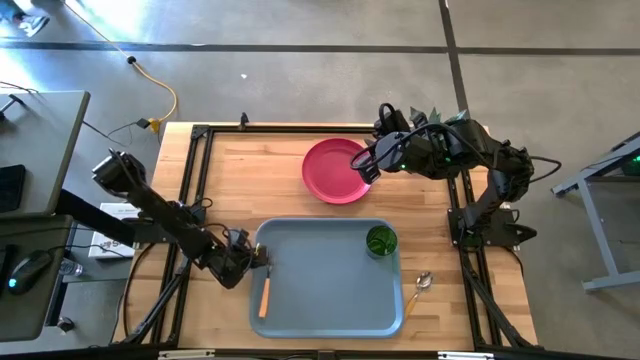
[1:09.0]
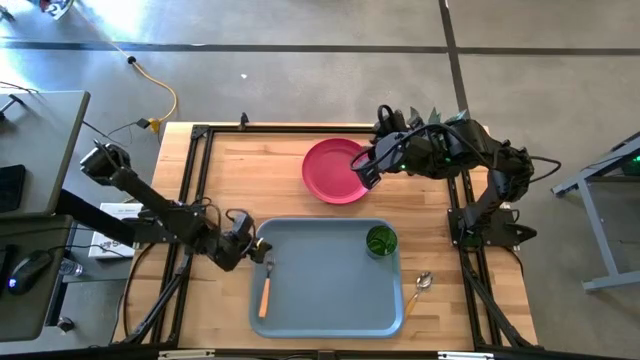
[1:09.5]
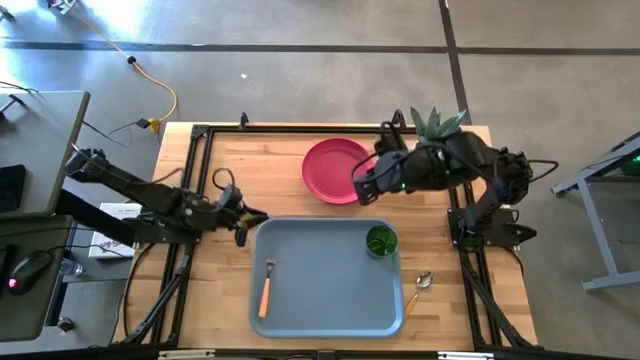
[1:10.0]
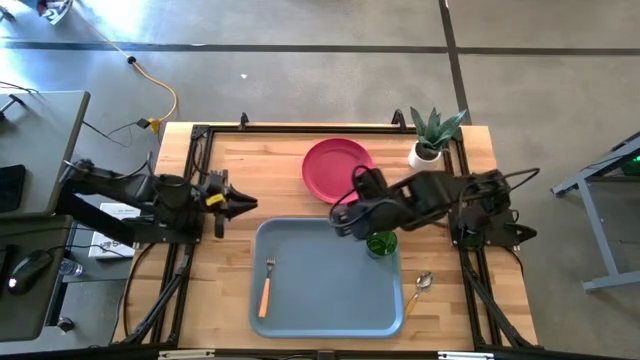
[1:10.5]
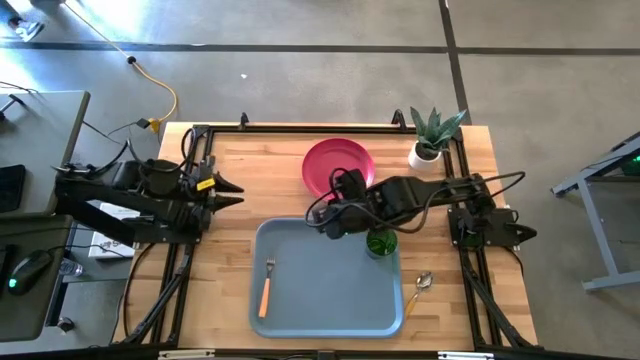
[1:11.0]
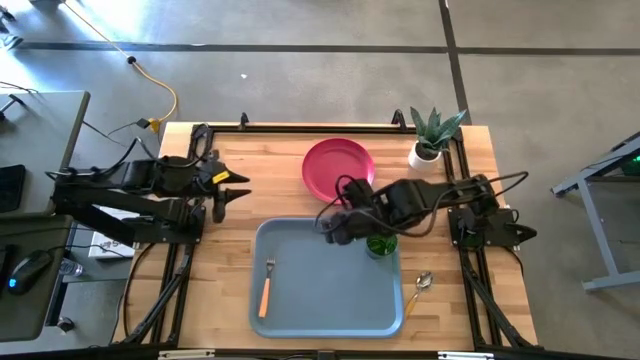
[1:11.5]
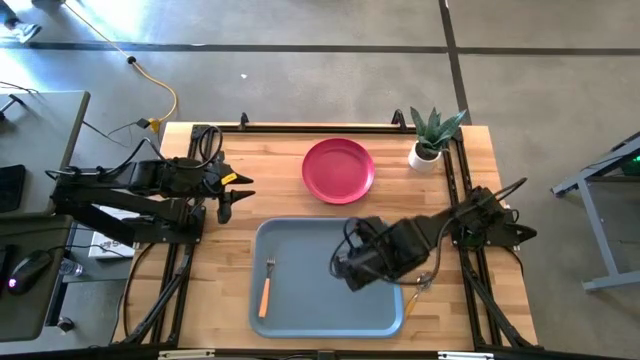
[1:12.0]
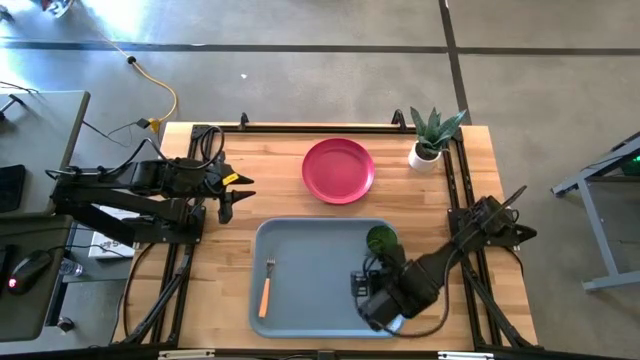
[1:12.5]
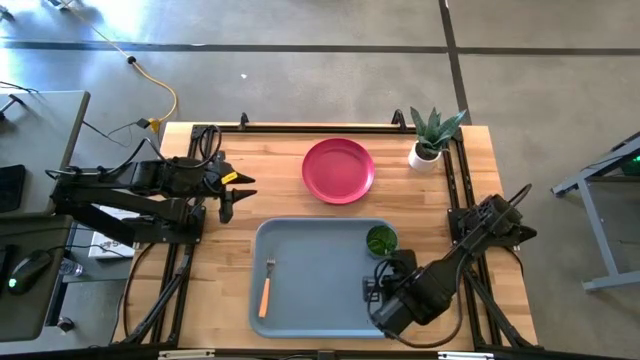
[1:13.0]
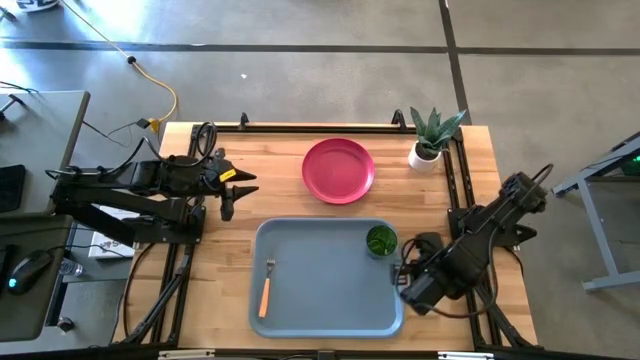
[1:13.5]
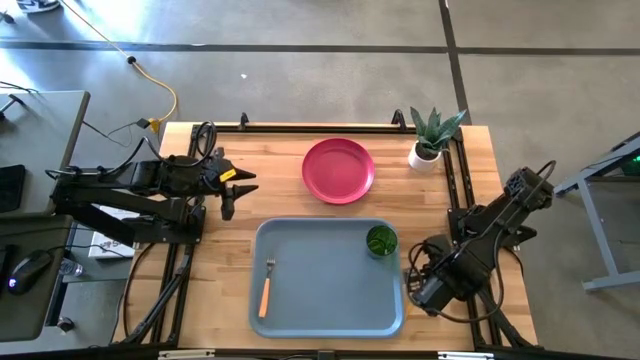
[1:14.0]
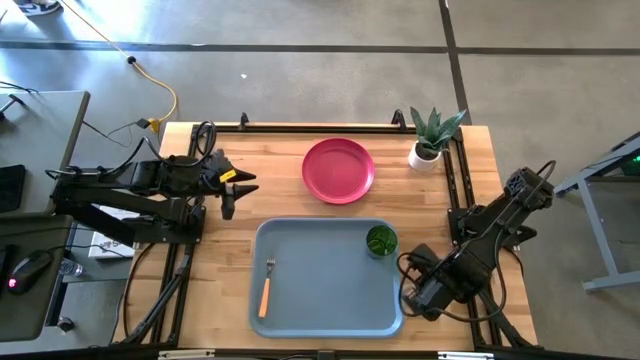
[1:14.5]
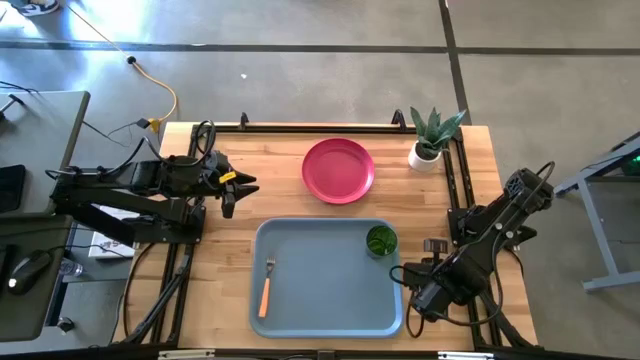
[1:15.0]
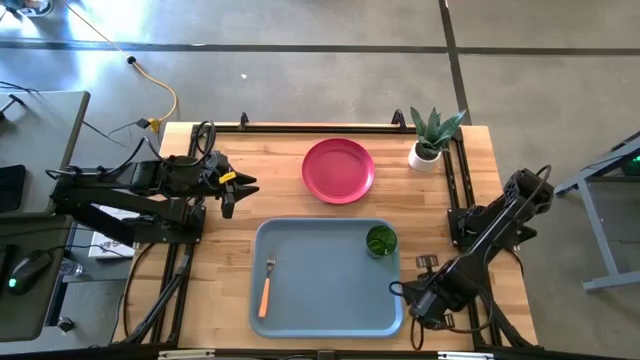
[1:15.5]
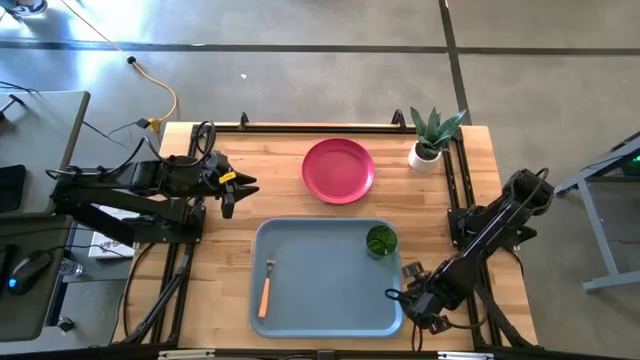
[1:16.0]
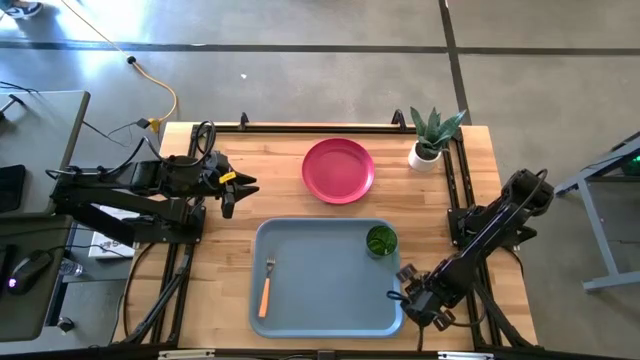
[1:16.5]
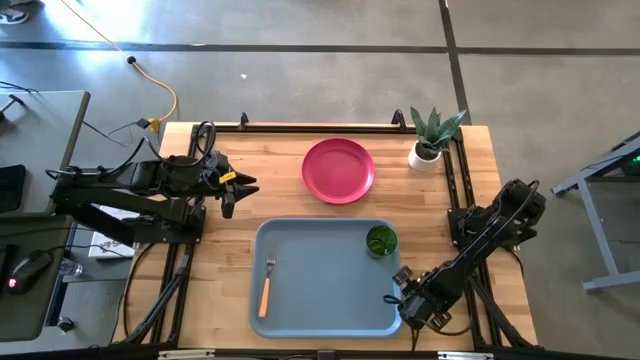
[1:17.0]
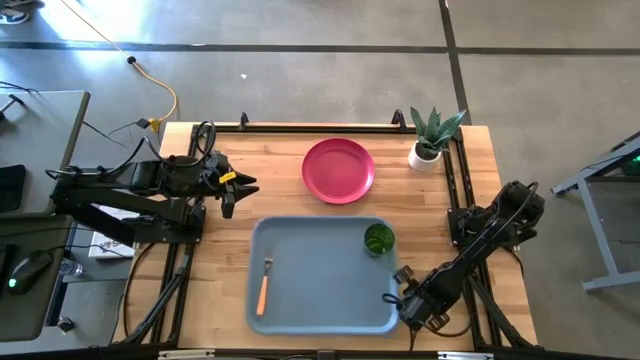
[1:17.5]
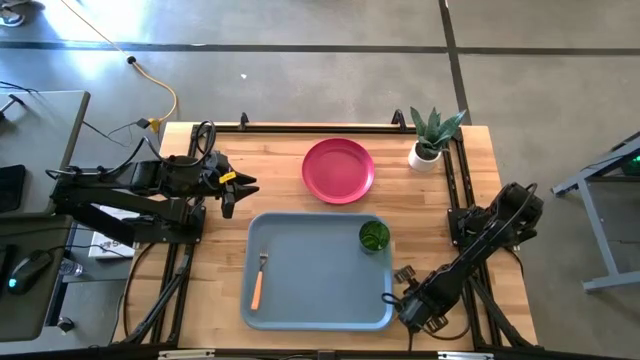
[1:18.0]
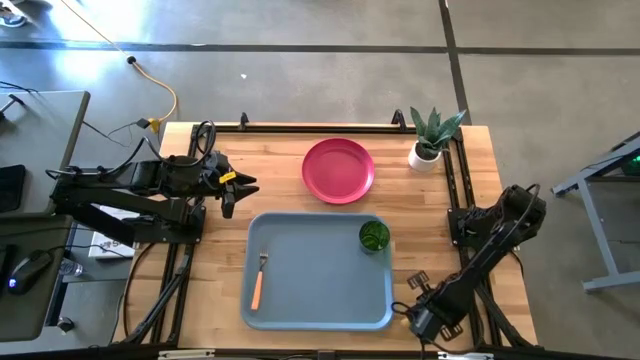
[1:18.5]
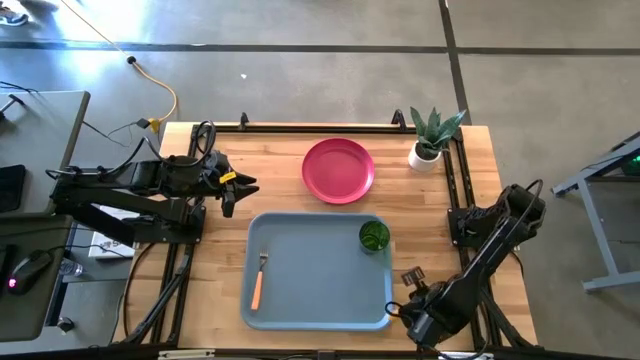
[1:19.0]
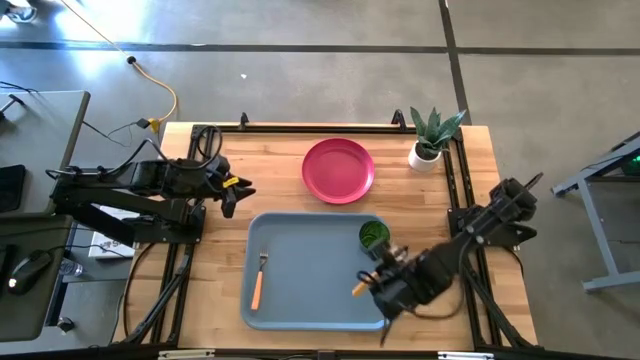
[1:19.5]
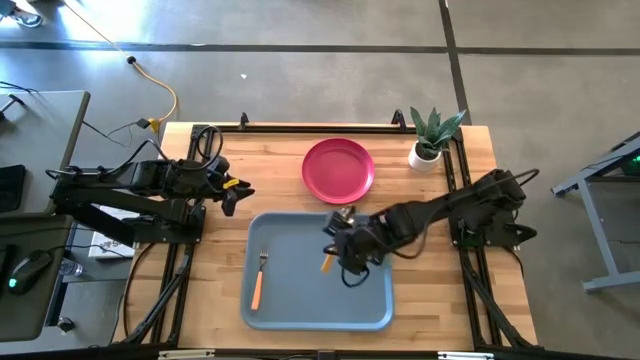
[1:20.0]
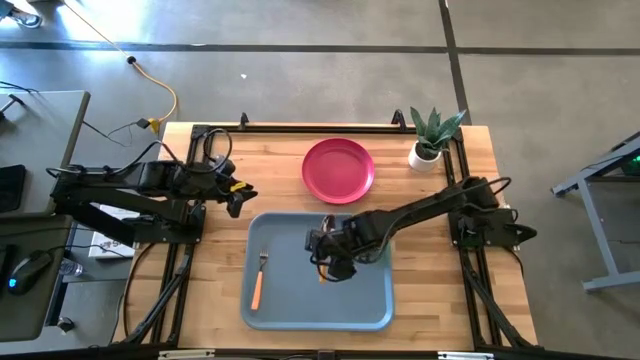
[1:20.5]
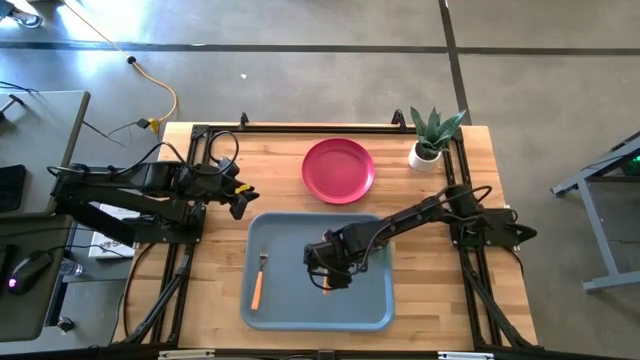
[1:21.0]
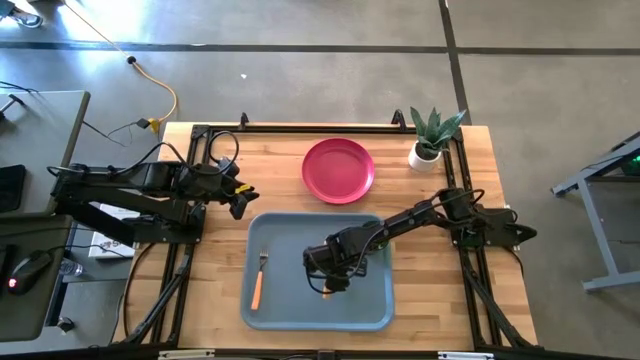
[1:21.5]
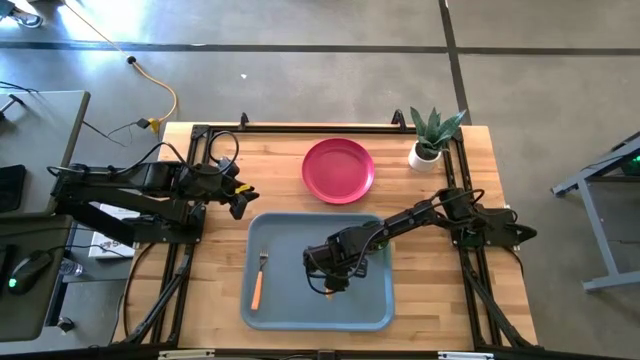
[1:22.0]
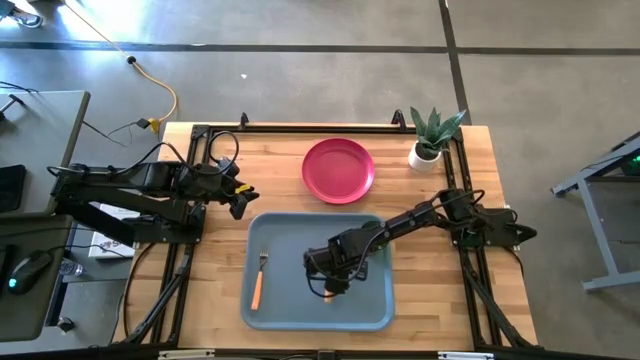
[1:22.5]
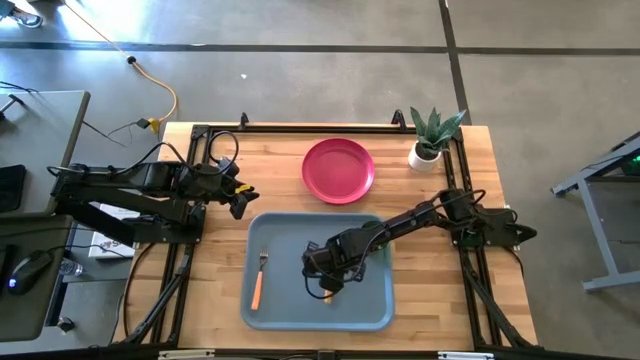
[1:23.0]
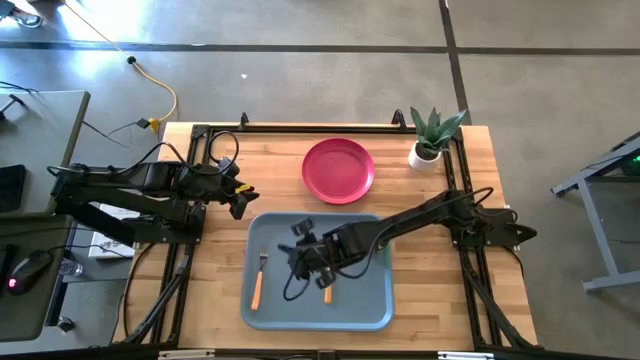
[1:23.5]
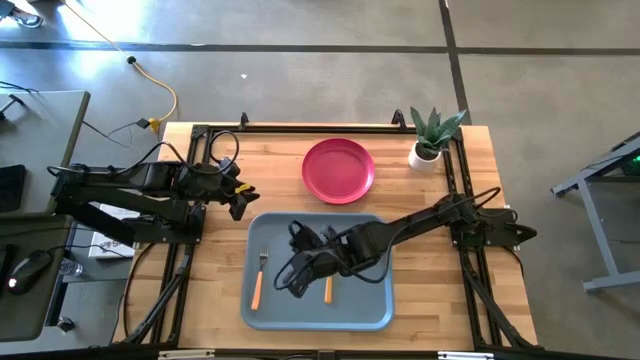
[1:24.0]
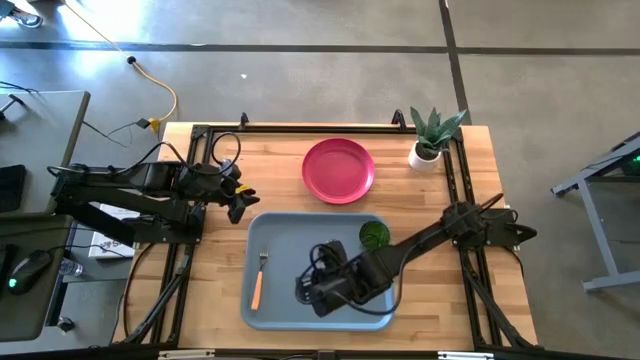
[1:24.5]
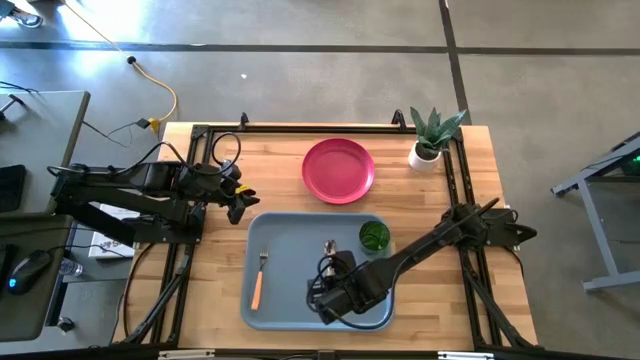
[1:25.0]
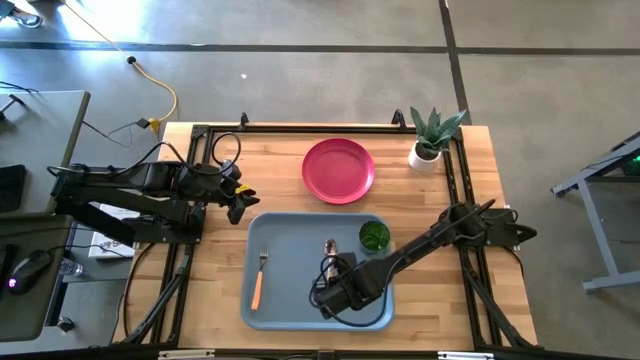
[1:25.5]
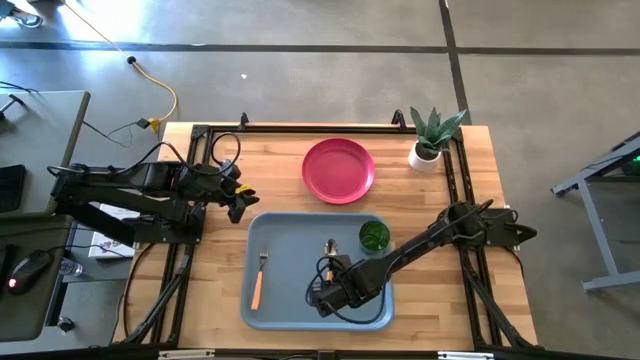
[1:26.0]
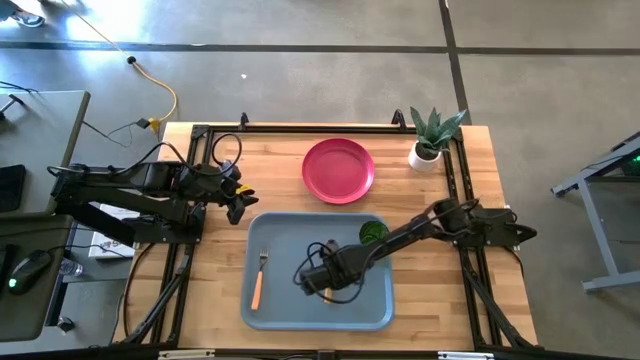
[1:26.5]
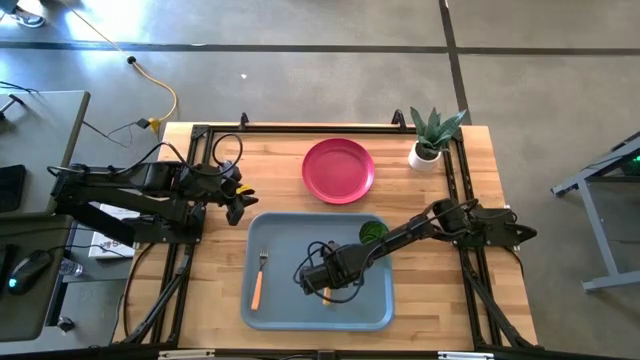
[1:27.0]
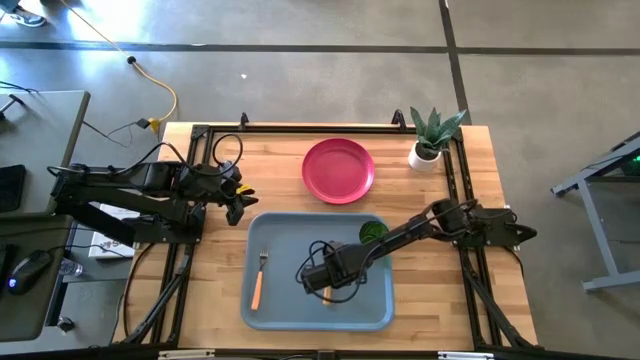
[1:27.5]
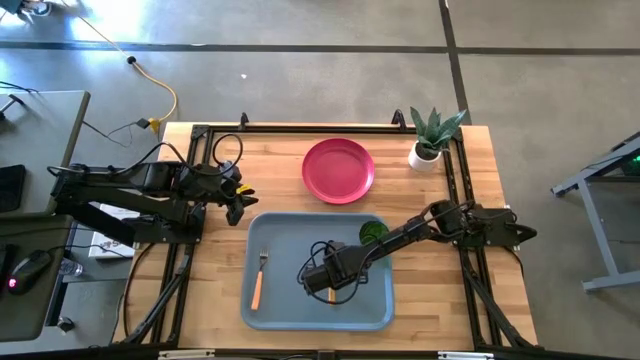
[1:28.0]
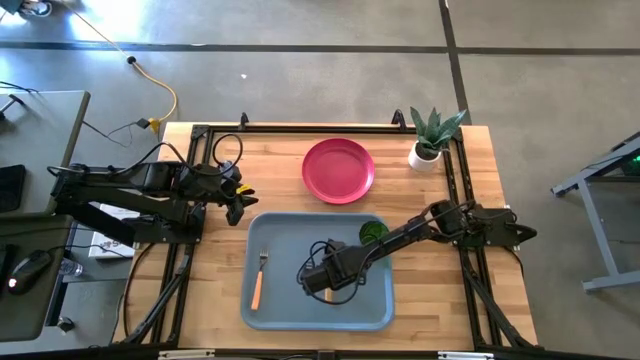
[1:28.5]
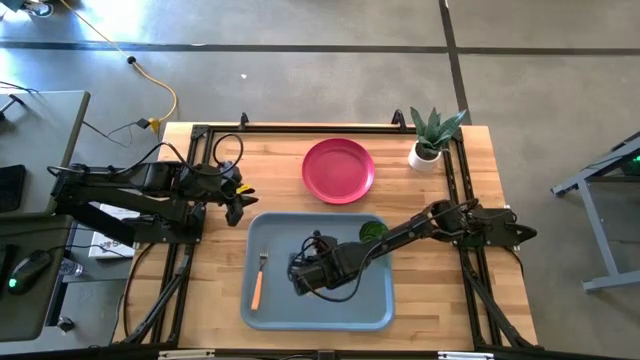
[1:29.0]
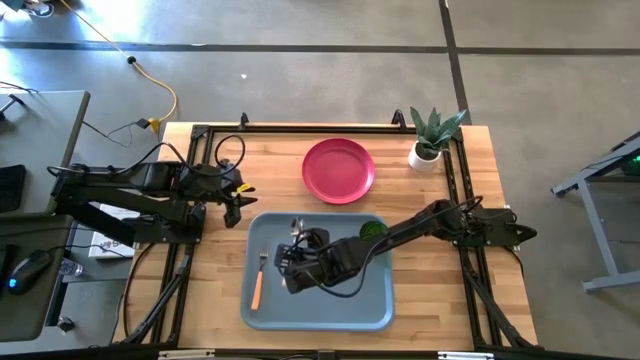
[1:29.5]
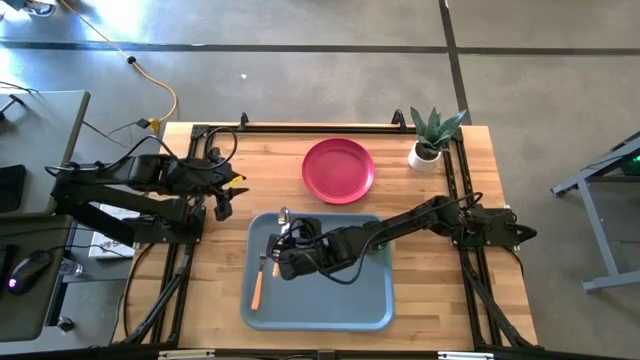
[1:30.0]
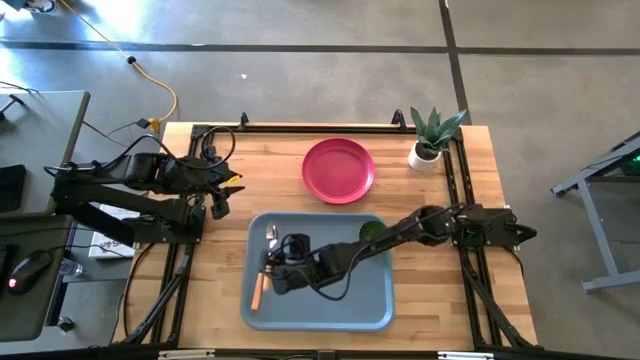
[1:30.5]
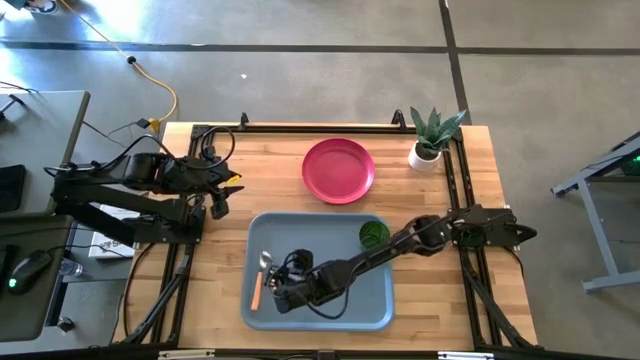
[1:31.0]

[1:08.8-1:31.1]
Task: Pick and place plate/cup/fork/spoon on tray
Put the yellow spoon on the blue serving tray to the right of the orange fork

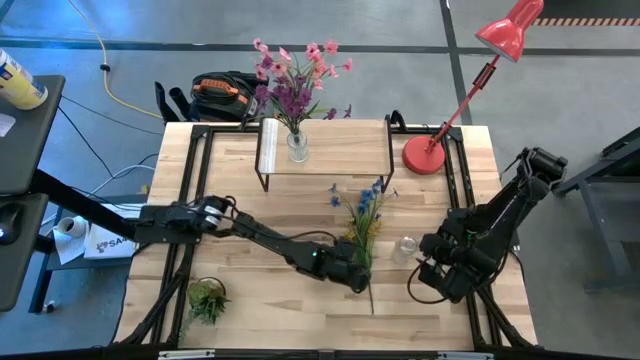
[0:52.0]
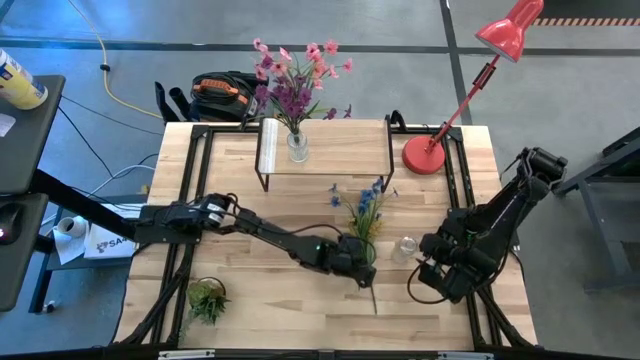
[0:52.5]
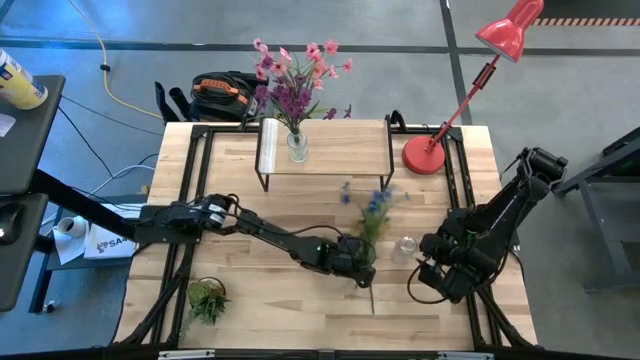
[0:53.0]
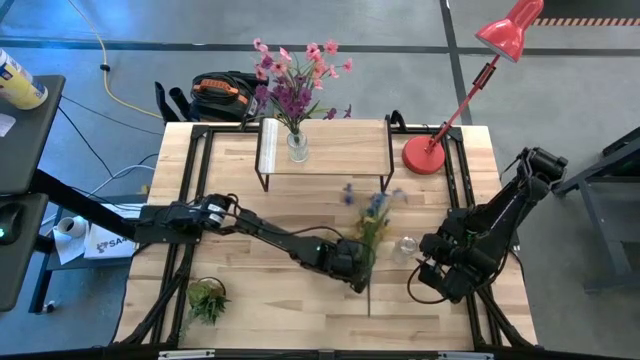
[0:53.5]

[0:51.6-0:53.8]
Task: Pick and place flowers into a vace then onto a shelf
Put the blue flowers into the transparent vase
